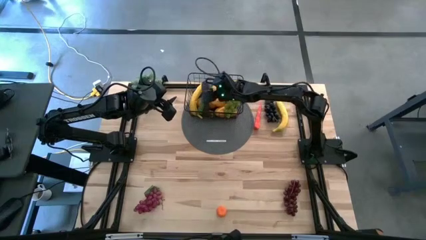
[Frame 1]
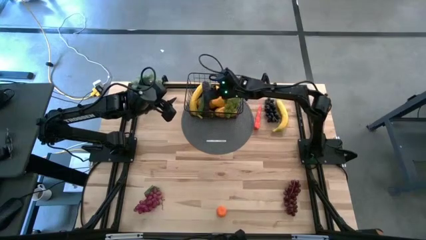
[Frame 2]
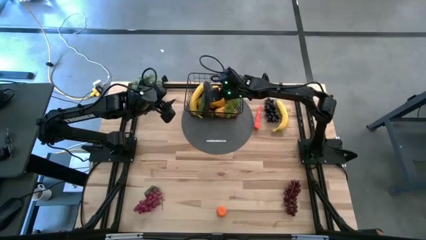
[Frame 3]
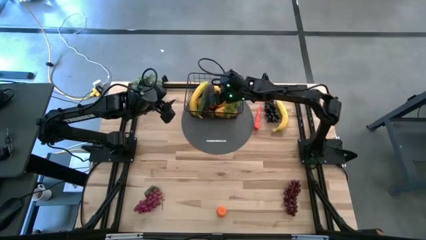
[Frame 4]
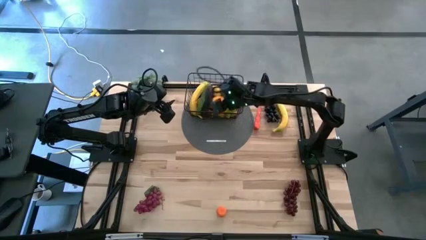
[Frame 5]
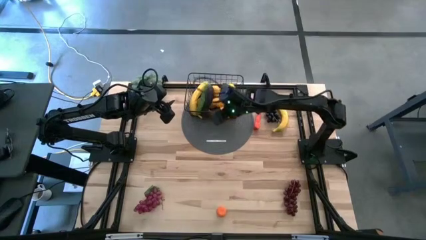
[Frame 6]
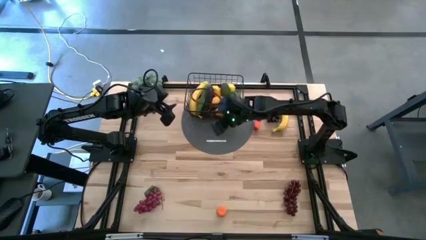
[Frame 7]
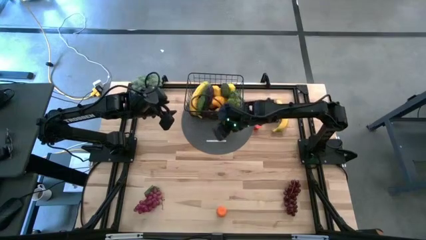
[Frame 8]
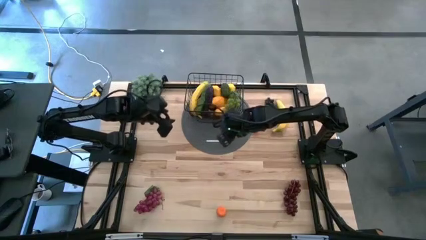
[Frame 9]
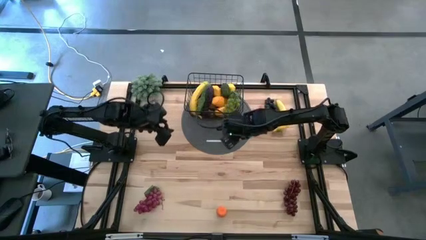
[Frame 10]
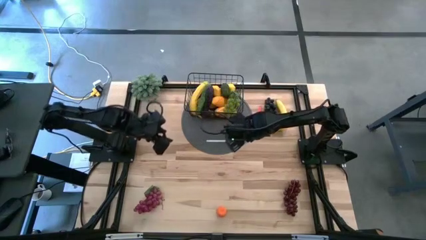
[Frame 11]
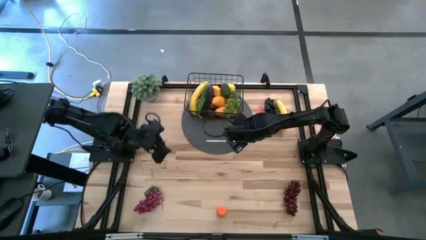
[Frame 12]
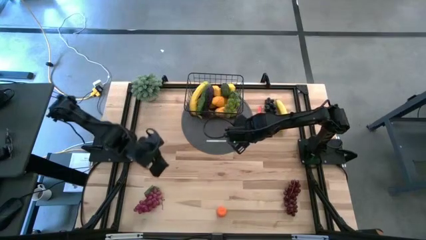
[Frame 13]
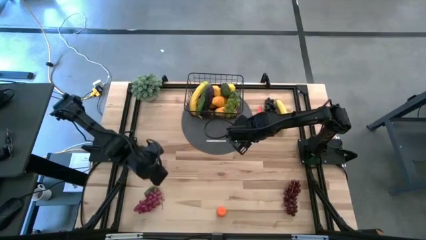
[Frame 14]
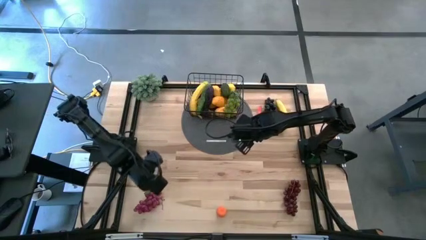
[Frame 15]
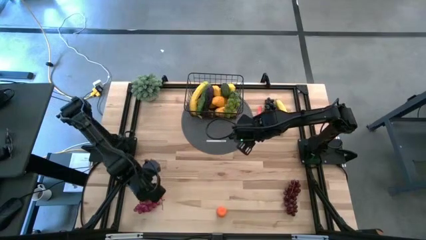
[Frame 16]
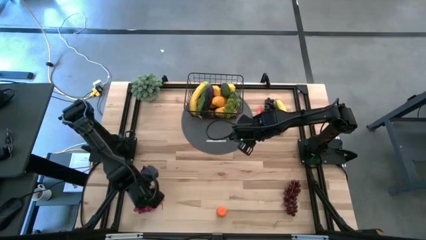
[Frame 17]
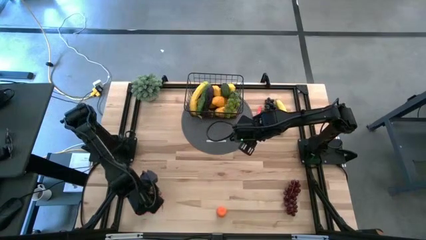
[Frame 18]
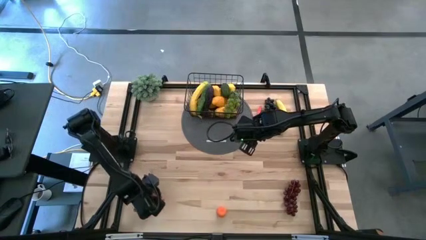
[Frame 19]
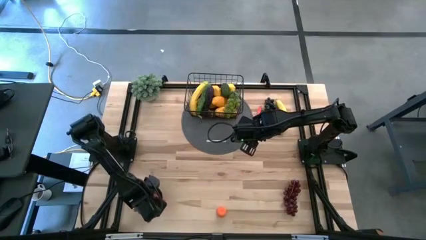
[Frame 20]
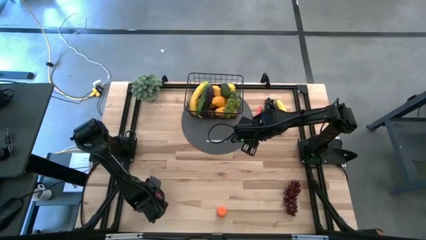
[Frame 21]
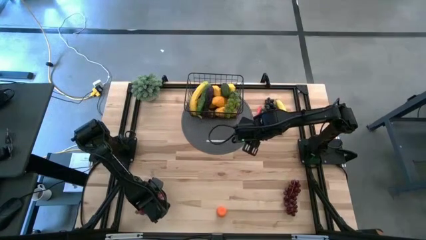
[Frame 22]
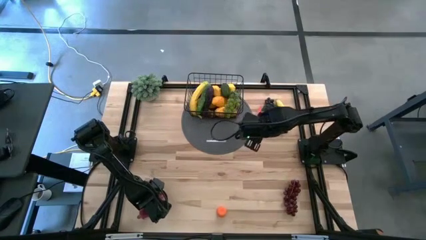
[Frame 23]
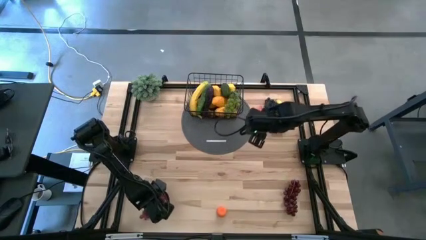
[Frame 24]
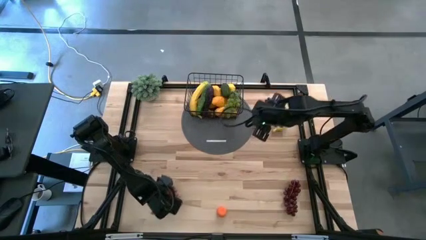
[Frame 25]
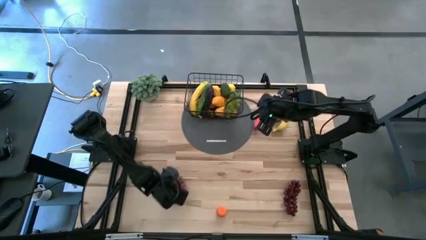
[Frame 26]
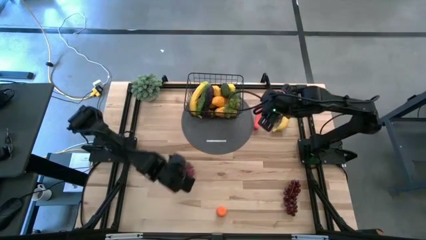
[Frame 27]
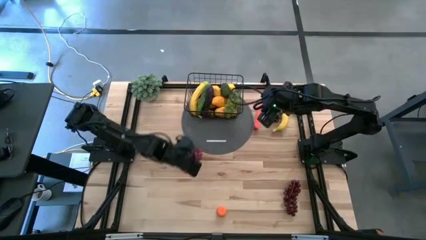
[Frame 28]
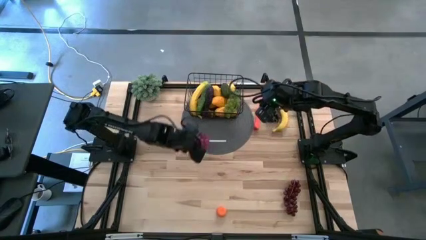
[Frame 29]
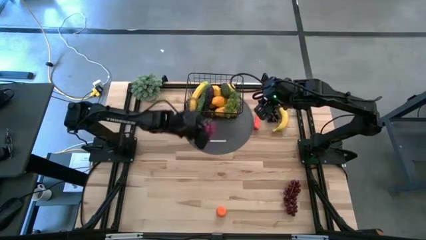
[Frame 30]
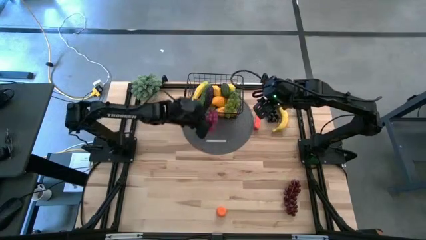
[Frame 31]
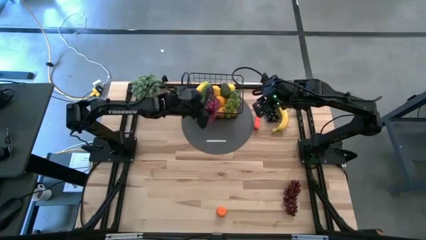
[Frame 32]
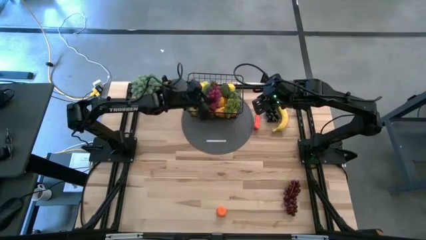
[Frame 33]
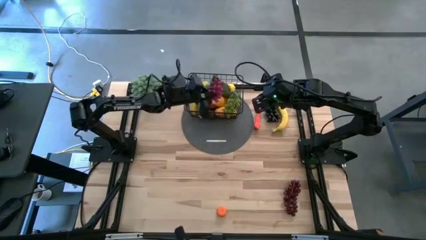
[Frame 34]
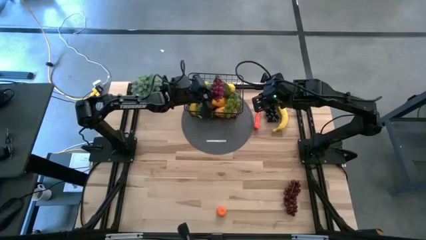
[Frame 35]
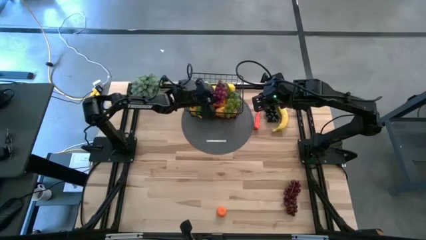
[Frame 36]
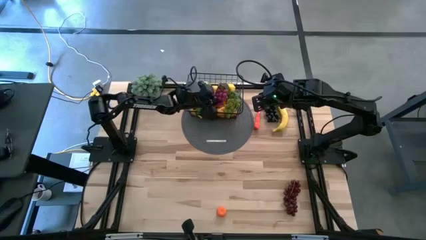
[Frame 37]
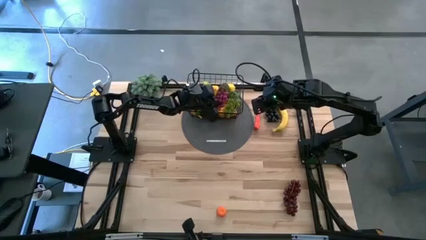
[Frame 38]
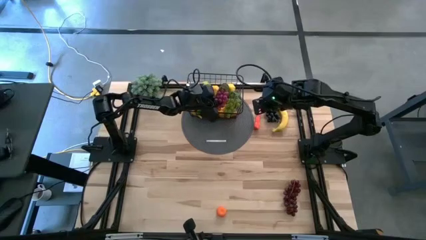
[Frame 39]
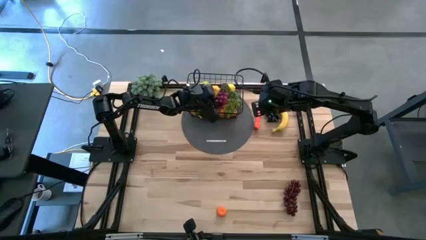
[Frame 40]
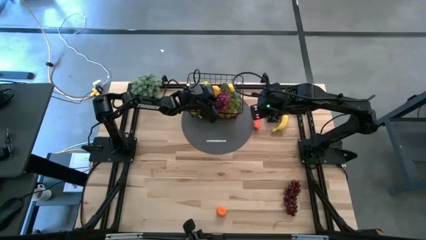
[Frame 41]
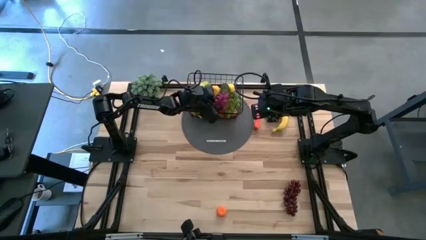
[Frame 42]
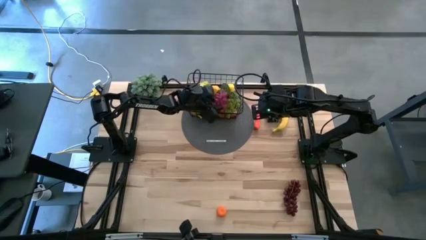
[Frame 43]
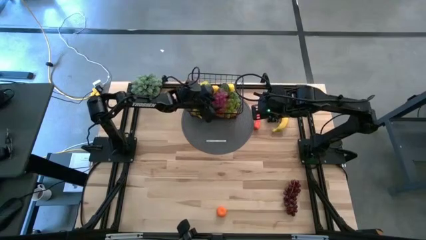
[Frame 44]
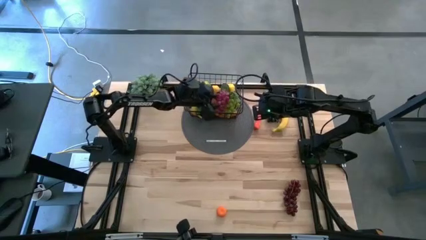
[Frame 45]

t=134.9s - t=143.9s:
Task: Build produce basket
Put the grapes into the black wire basket

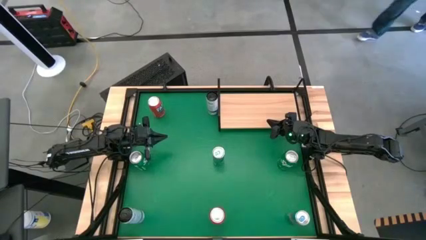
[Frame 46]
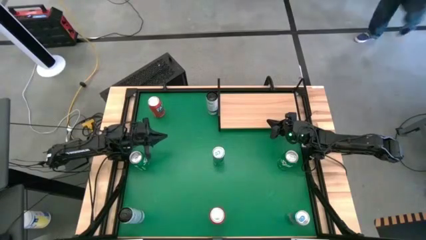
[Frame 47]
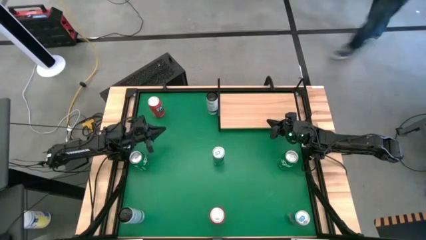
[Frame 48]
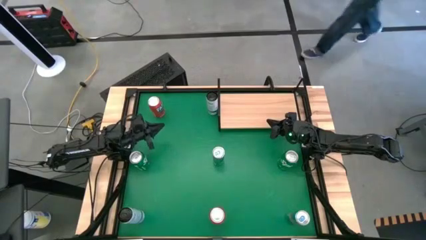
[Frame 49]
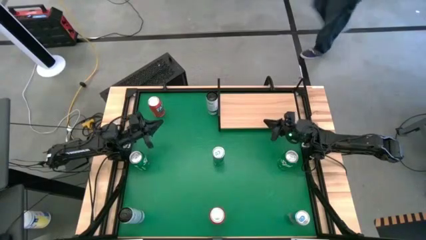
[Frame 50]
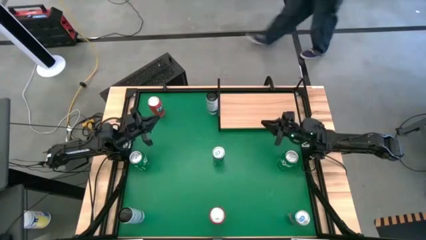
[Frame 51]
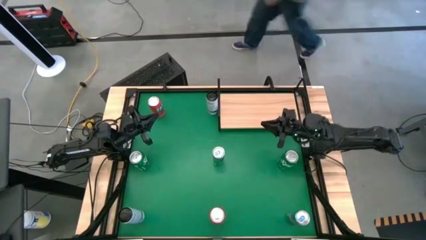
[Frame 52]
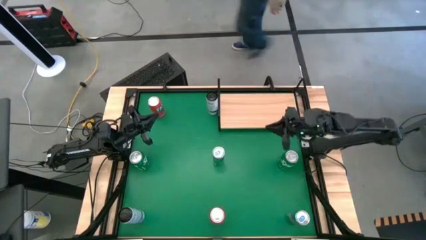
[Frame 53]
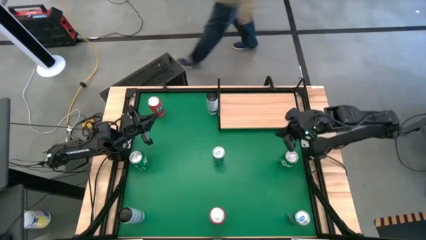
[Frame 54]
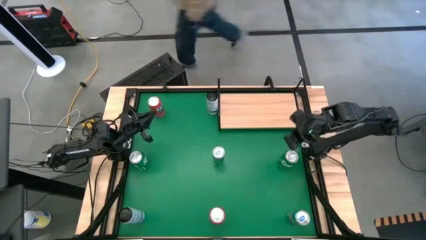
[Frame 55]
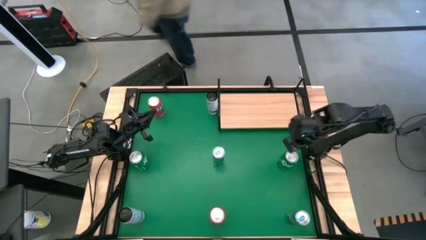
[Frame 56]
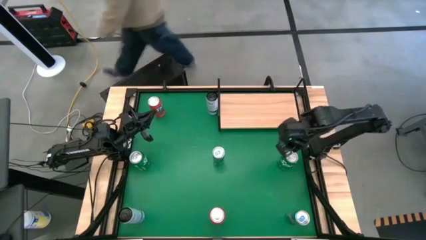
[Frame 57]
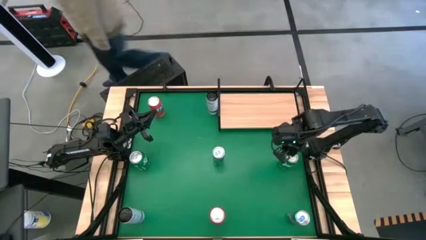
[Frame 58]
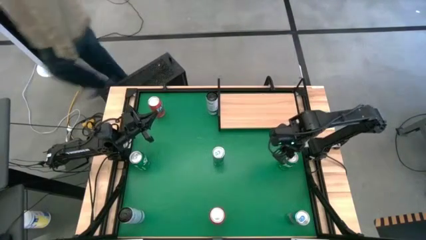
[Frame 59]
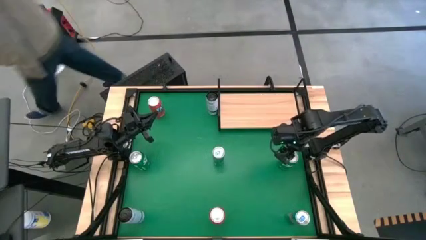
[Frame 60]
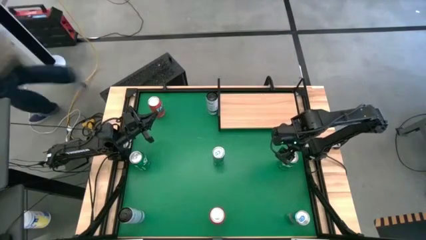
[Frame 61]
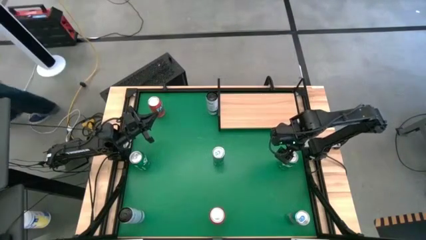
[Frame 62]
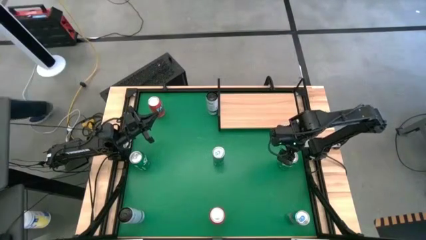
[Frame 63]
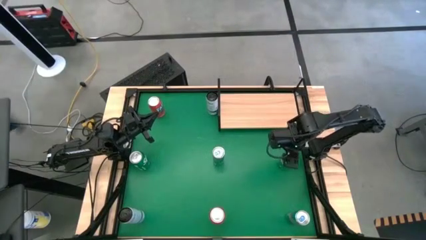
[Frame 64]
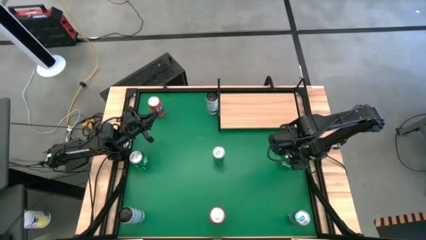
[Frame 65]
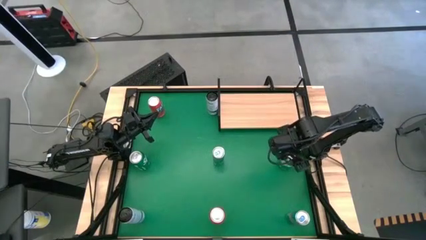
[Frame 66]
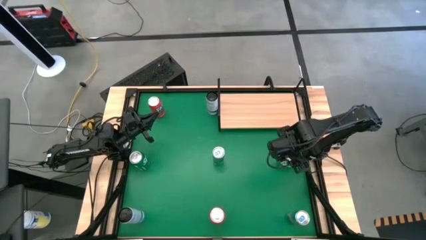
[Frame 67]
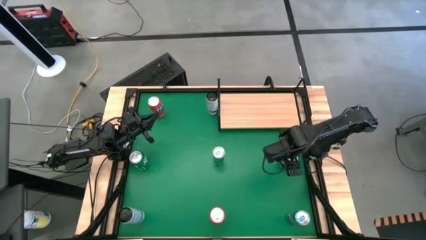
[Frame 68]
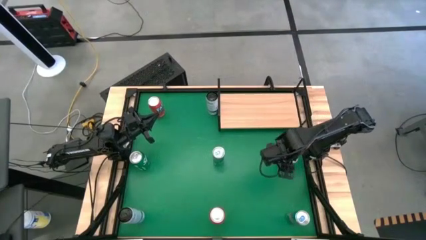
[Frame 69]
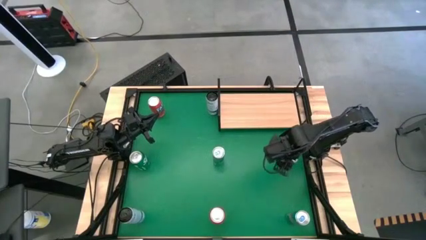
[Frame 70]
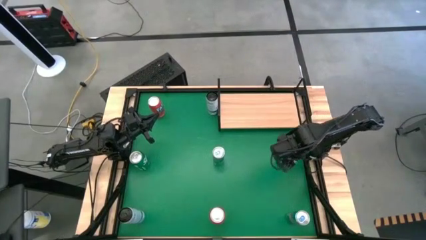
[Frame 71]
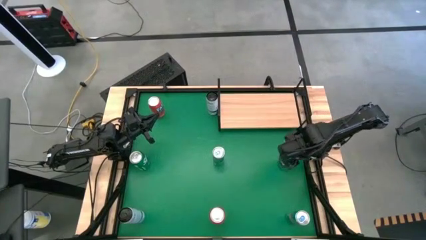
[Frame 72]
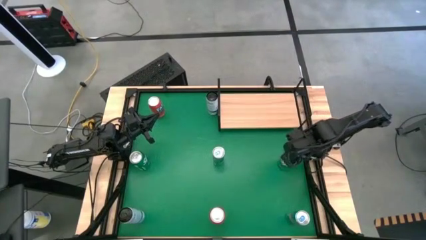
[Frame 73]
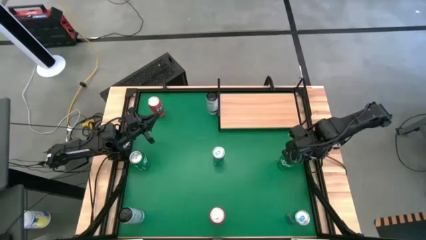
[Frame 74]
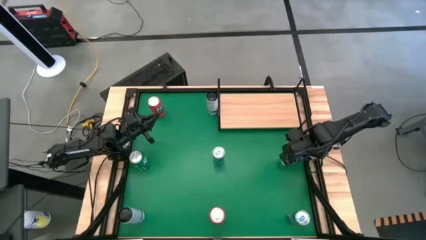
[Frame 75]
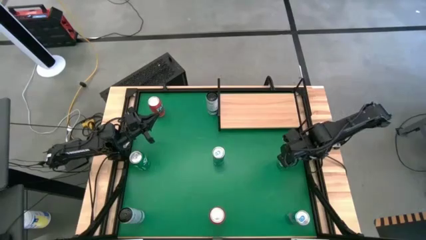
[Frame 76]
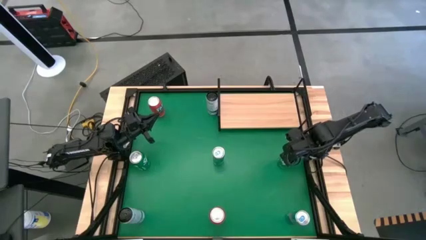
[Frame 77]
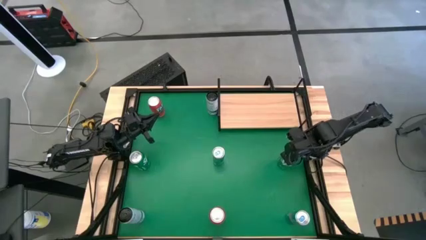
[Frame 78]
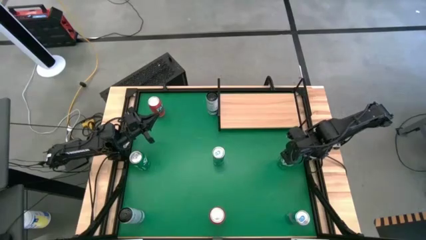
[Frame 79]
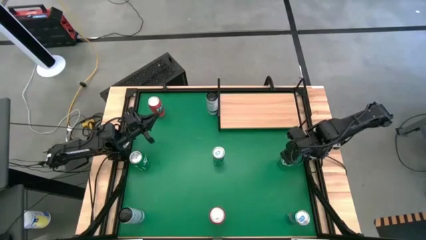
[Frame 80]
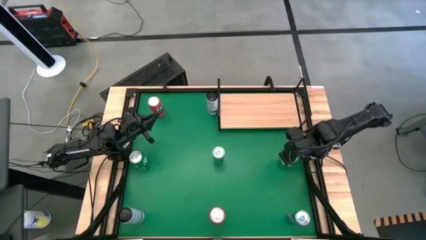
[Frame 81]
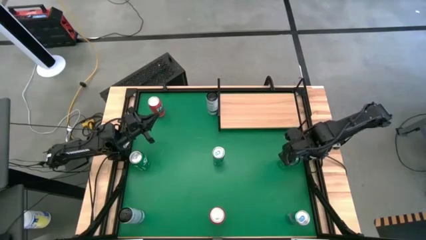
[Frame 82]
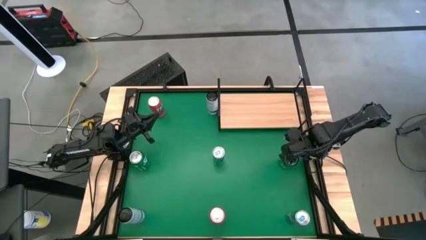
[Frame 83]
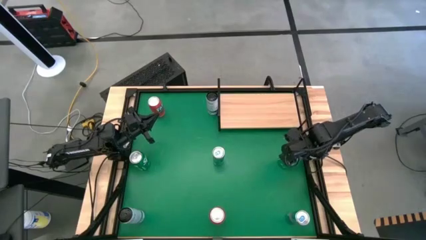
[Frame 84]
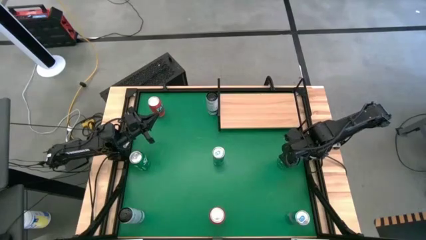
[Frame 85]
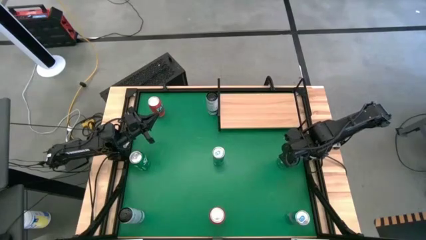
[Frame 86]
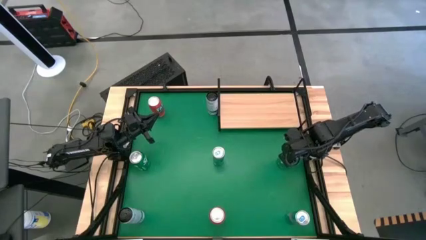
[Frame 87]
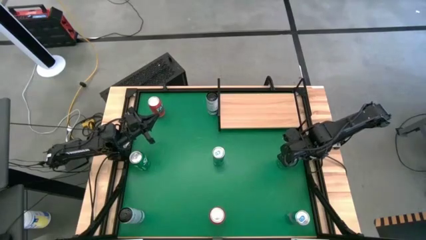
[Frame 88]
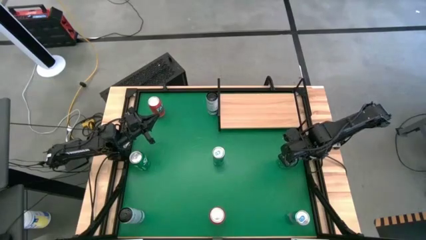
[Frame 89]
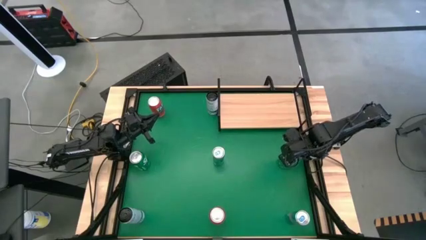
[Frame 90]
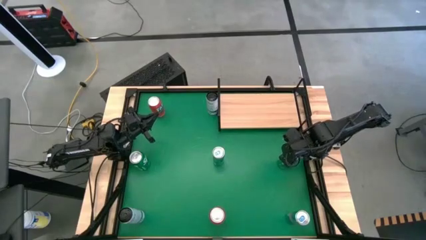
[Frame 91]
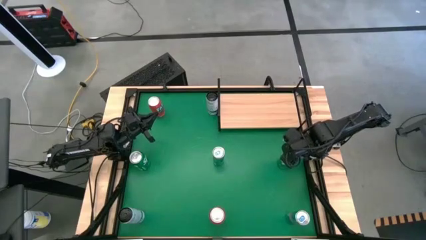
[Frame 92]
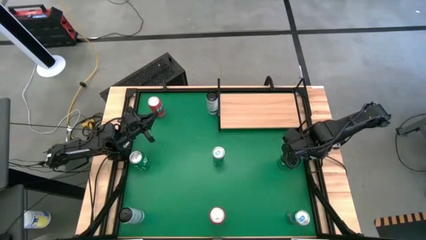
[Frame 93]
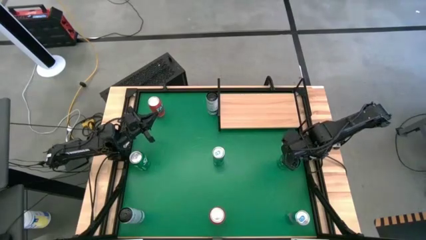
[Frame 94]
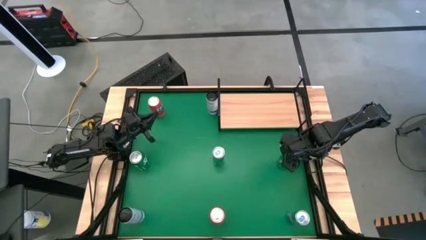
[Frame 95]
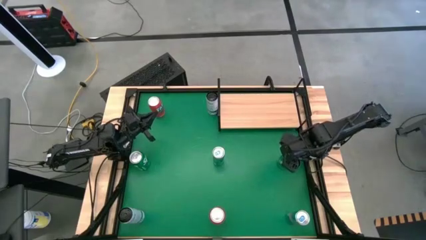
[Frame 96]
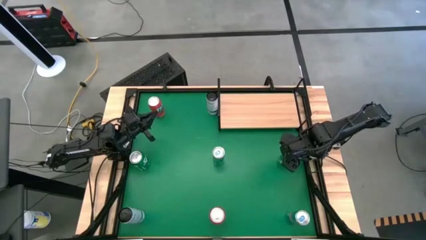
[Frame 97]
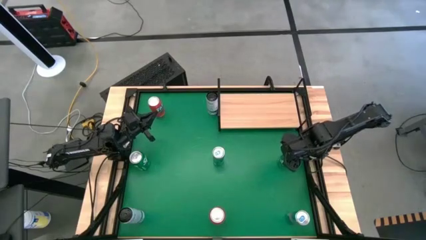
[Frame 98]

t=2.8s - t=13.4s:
Task: Place canned beverage on shelf
Put the right green soda can on the shelf
